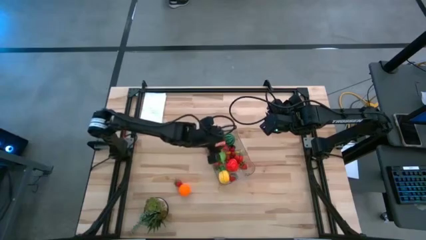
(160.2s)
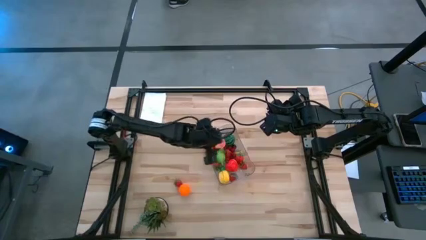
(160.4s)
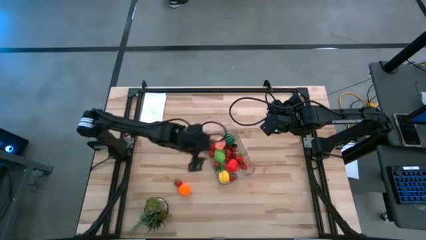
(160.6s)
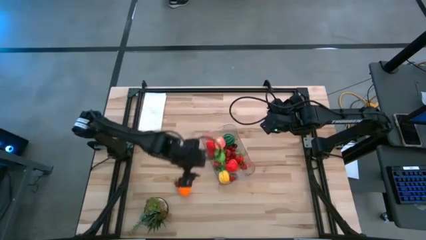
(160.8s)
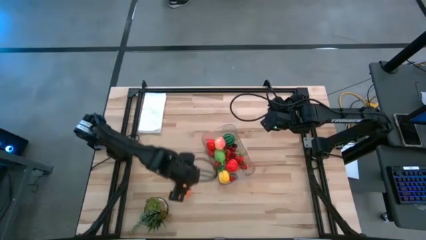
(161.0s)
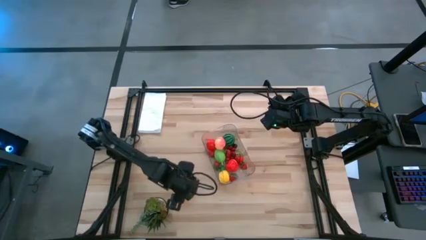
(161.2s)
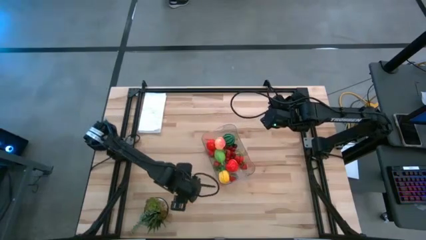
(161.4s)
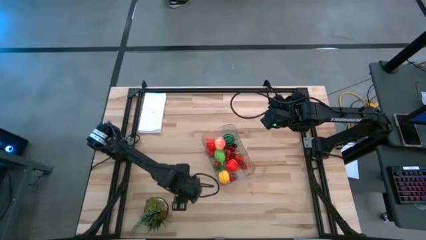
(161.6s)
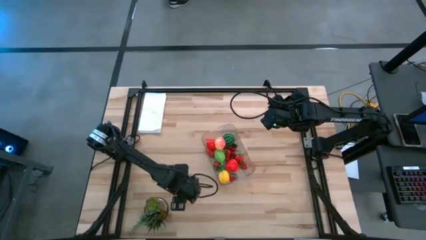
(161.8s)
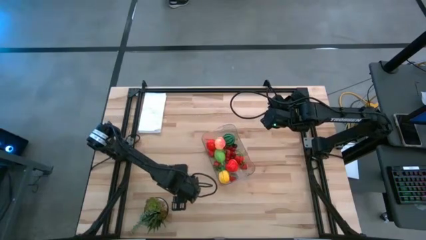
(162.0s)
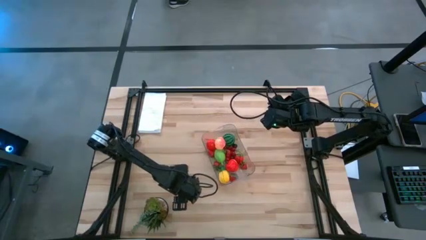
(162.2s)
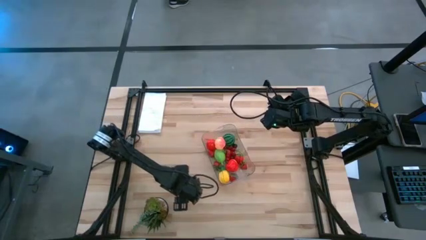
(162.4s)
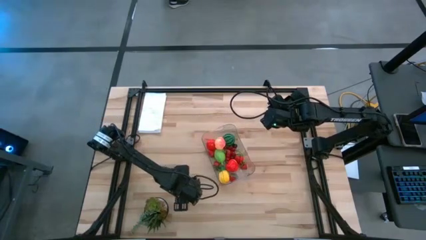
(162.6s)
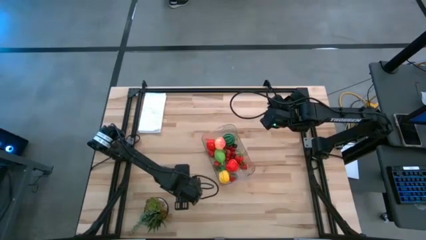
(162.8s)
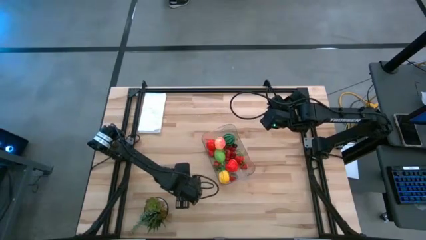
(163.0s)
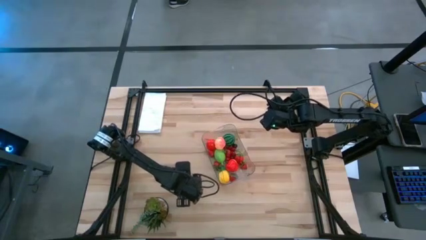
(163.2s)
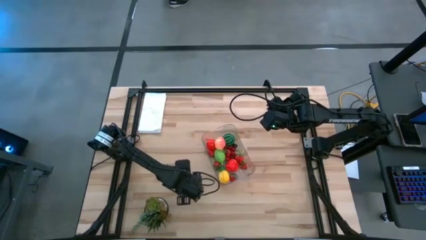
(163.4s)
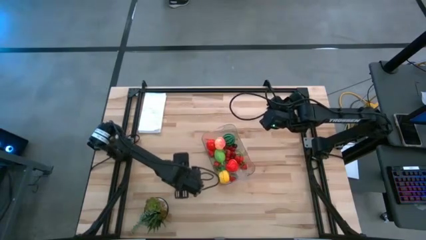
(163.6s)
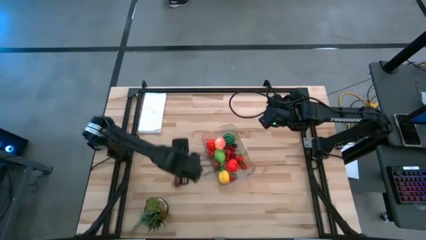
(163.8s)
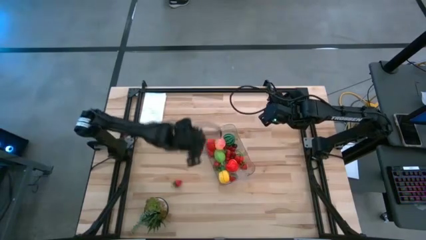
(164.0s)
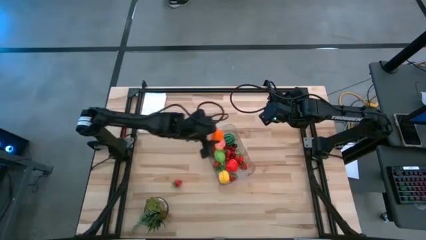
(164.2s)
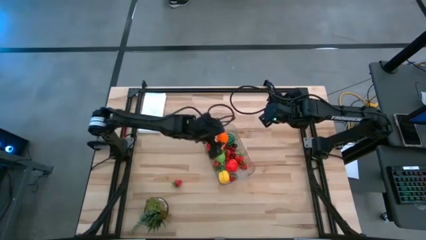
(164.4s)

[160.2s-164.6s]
Task: Pick and placing Produce into tupperware
Put the tangerine into the transparent bin

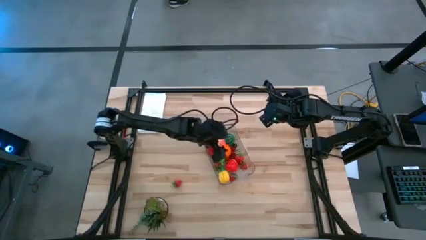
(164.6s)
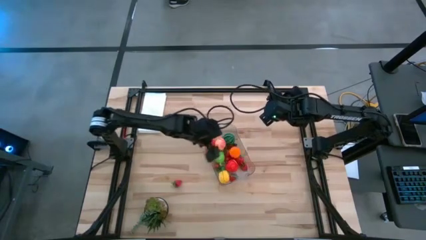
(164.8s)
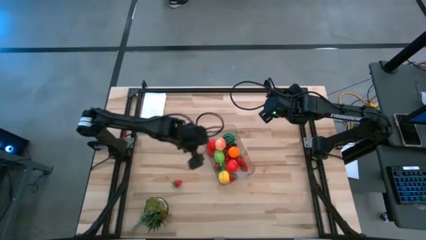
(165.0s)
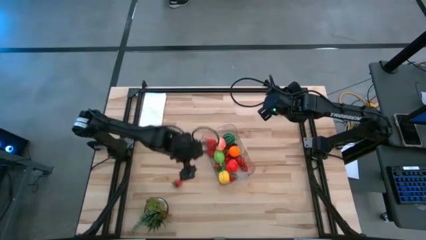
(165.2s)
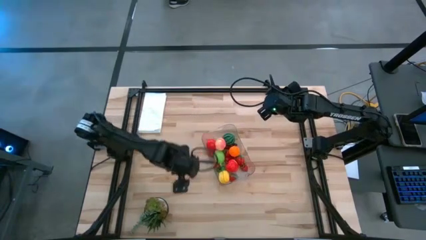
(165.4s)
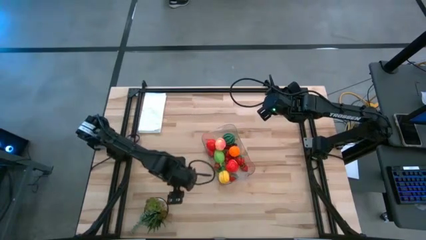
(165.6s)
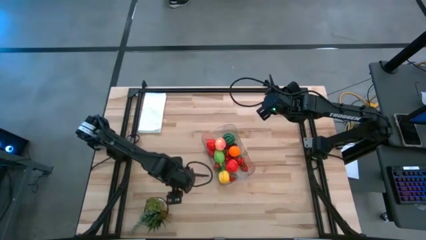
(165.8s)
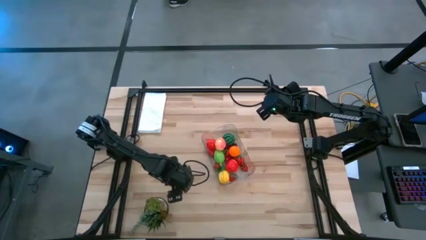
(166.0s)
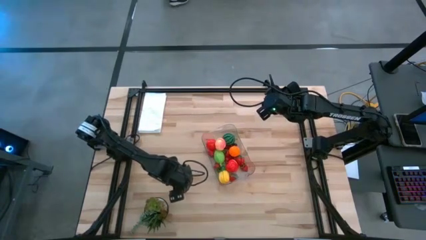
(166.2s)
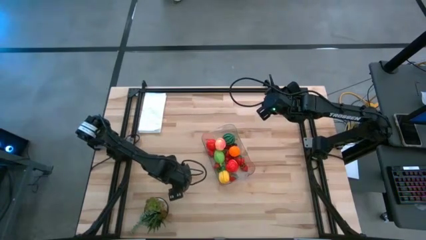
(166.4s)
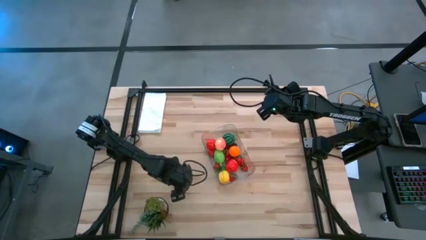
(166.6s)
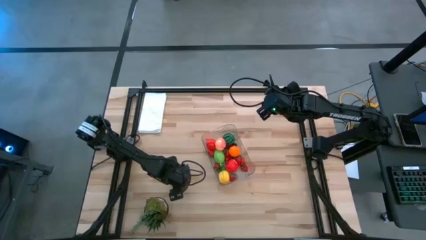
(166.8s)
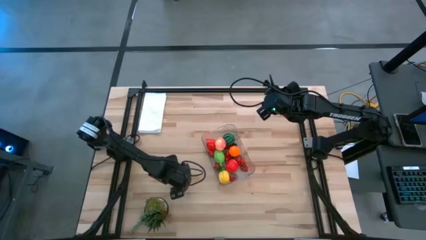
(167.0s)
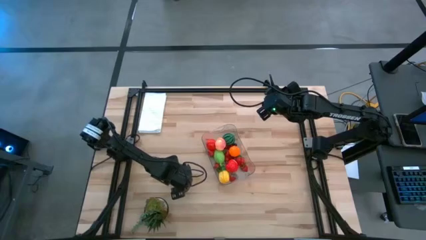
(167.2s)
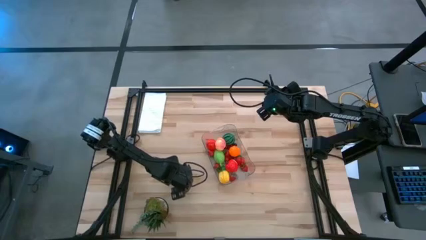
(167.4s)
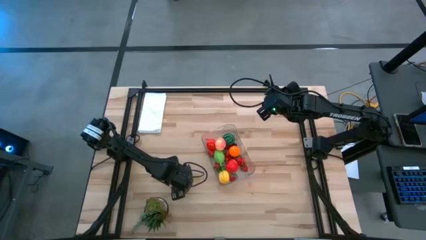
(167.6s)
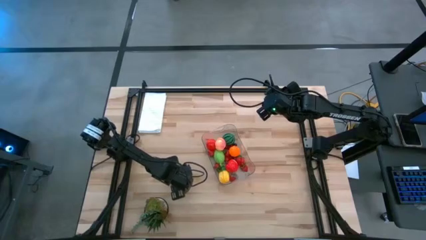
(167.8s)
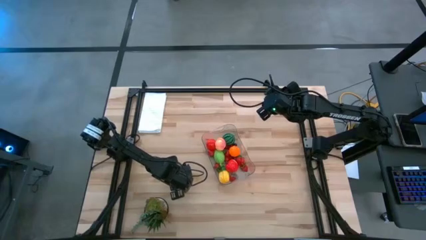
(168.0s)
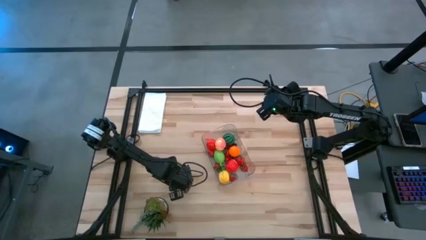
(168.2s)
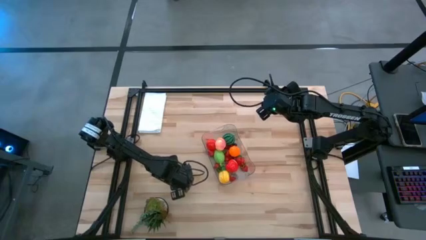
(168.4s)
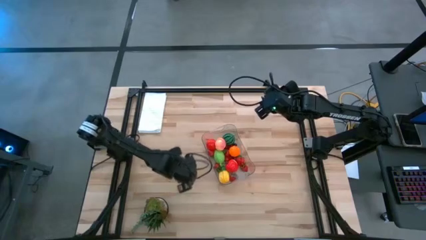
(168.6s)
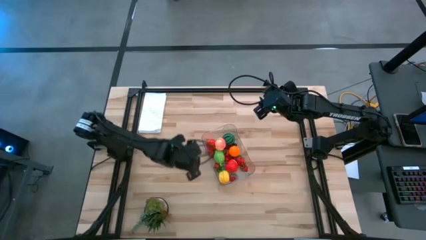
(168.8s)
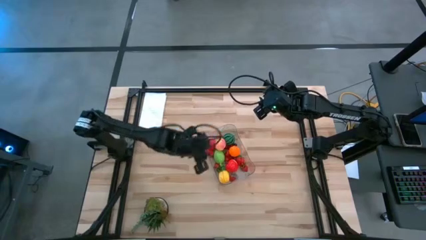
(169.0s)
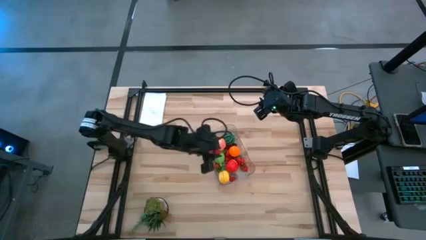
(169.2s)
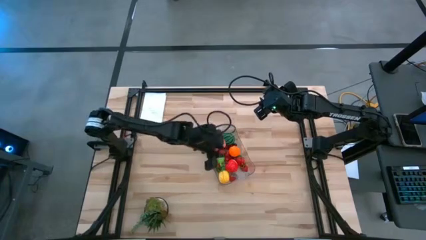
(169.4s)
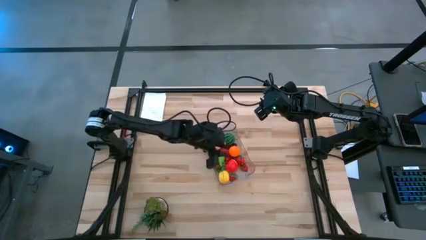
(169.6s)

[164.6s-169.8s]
Put the strawberry into the transparent bin

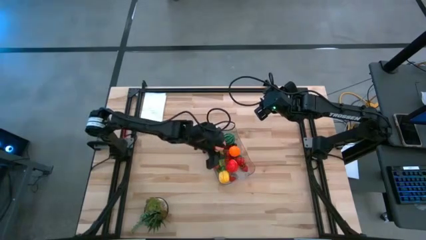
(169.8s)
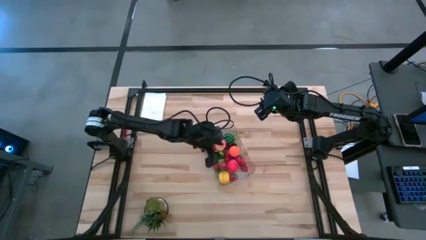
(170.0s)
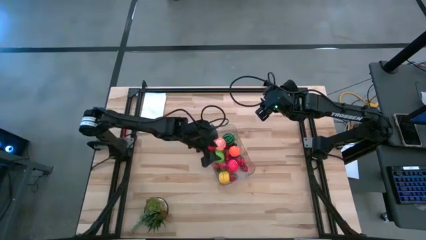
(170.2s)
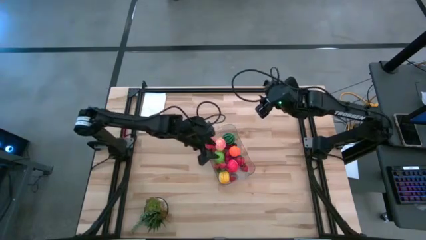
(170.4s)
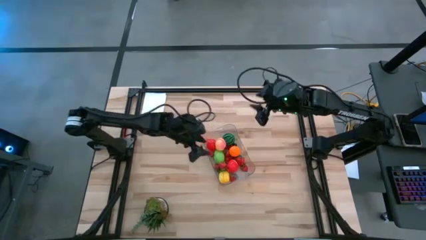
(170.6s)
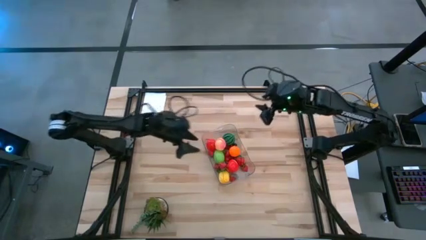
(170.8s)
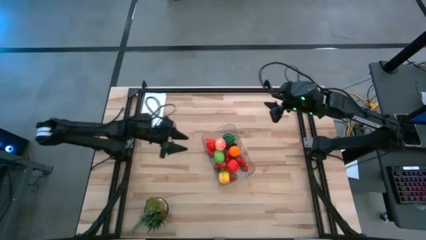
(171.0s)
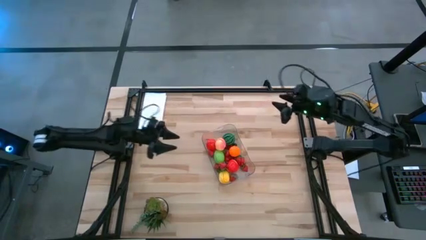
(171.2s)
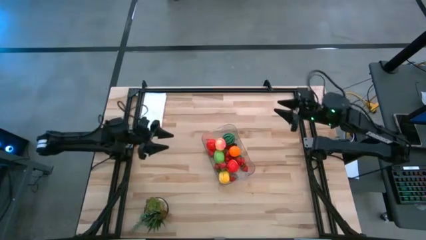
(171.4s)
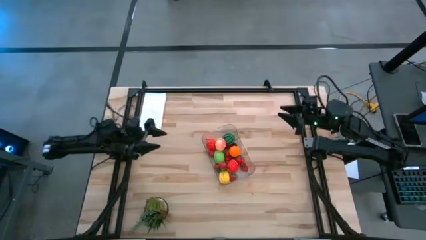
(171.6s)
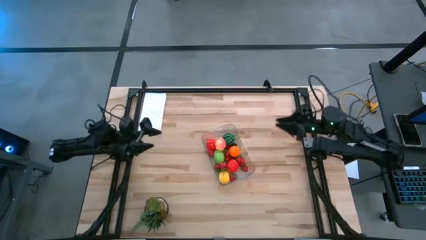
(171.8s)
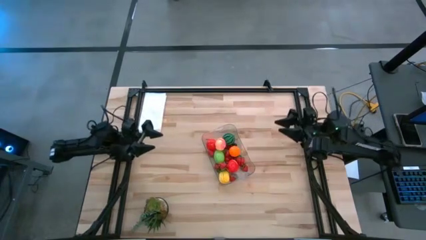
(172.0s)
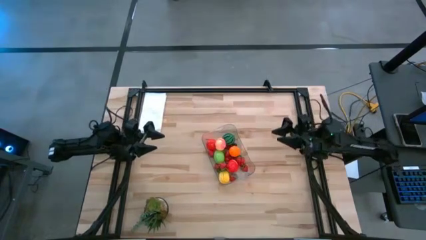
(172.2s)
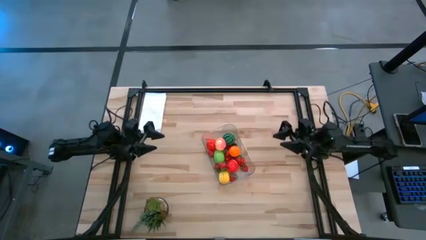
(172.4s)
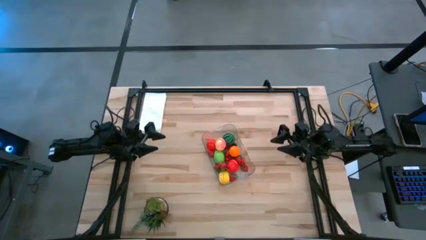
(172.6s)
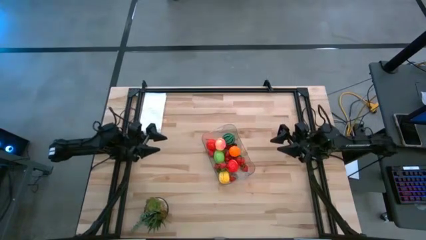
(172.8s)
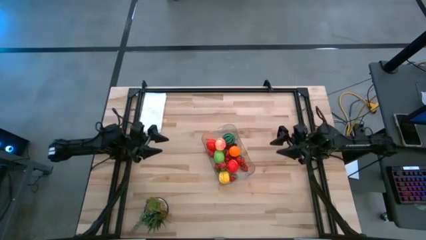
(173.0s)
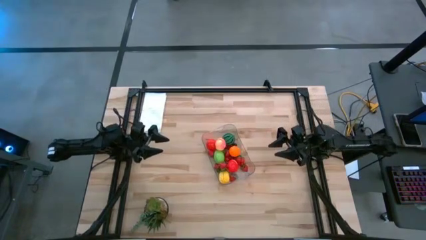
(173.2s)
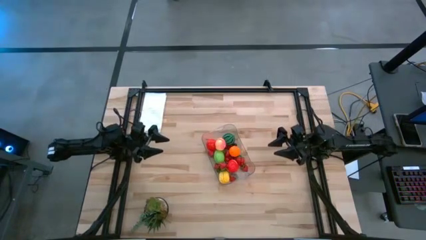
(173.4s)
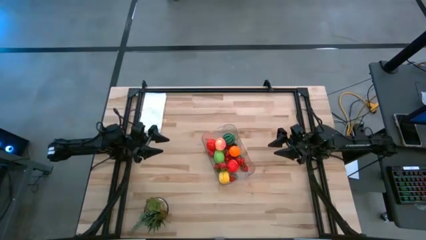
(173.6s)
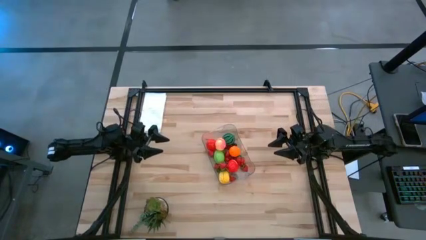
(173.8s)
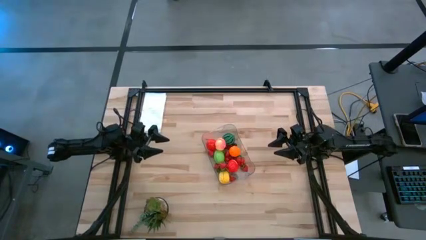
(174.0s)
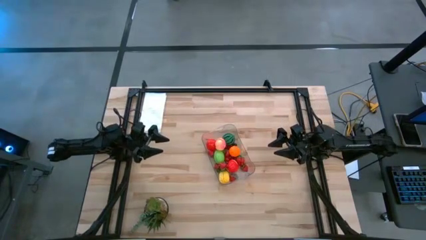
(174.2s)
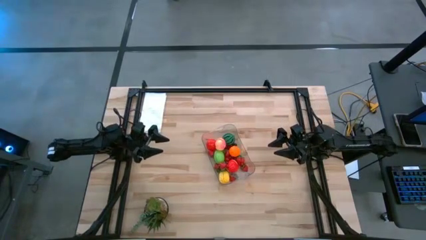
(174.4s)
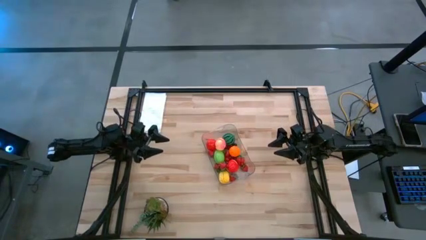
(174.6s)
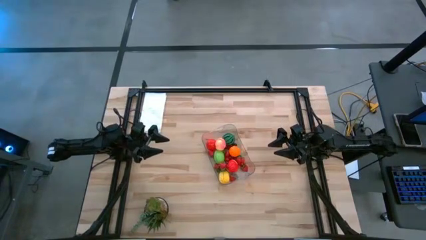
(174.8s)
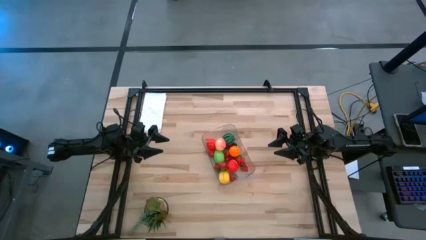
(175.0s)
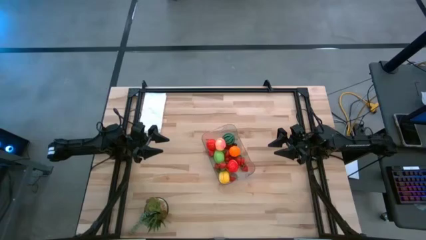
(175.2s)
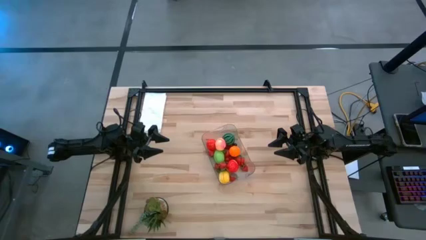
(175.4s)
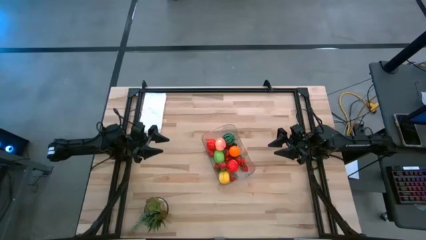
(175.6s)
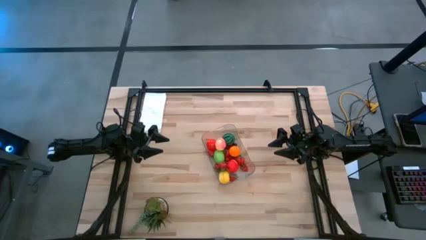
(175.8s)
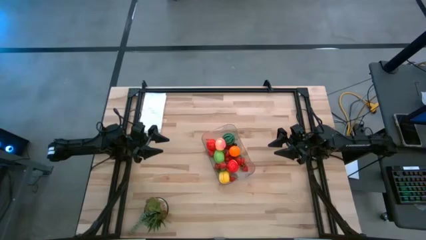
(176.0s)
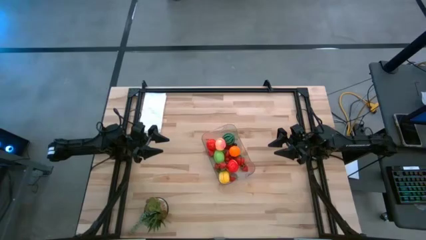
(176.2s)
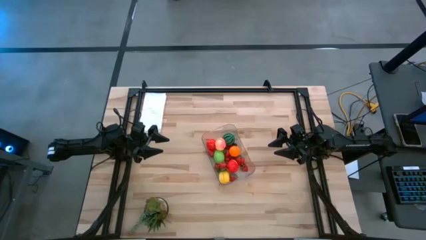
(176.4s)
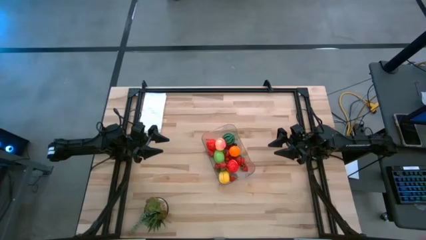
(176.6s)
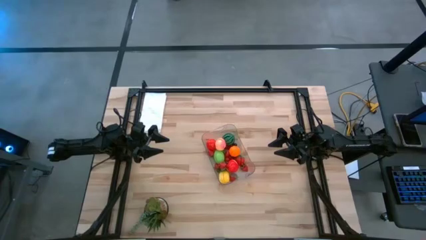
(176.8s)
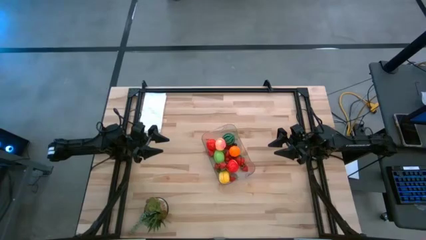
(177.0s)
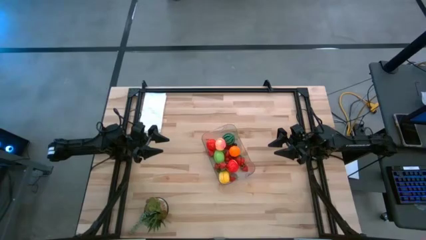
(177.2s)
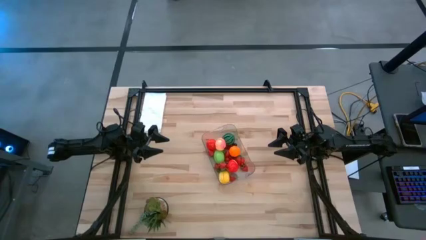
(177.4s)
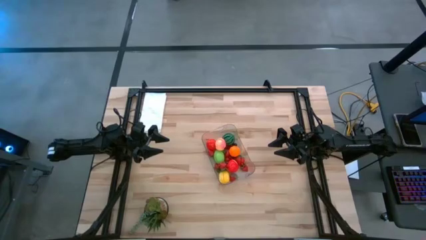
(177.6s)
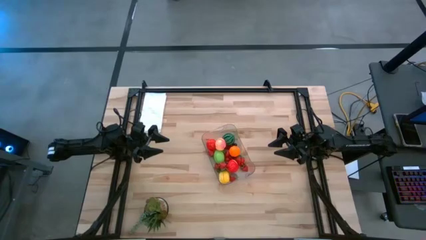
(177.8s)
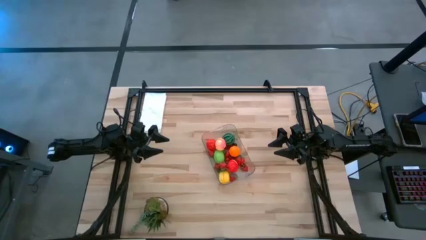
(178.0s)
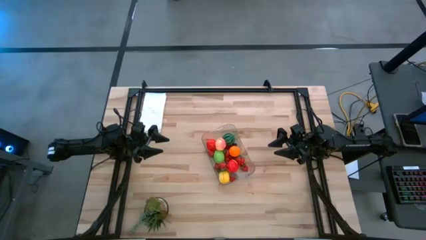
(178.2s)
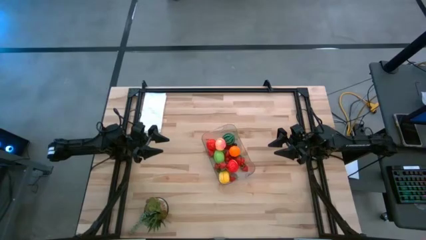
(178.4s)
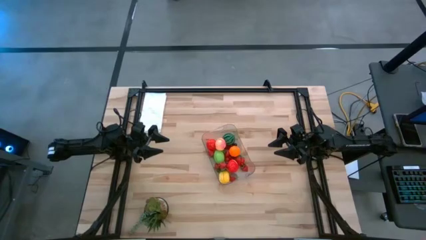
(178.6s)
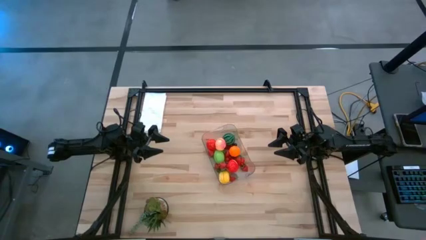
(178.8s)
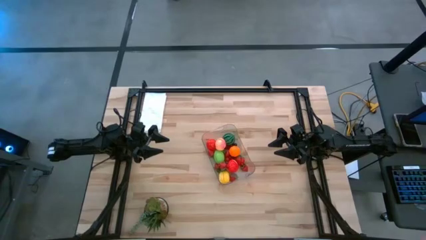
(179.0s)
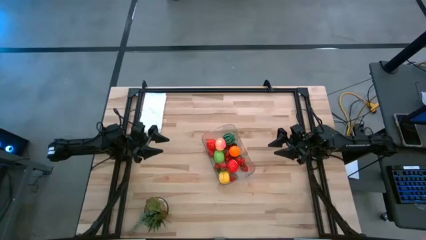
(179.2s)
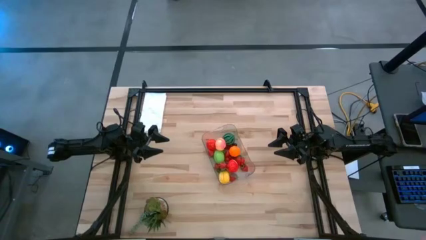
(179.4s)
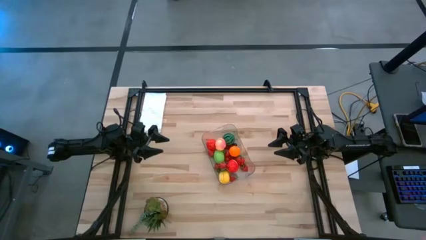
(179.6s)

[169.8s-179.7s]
Return to Home Position
